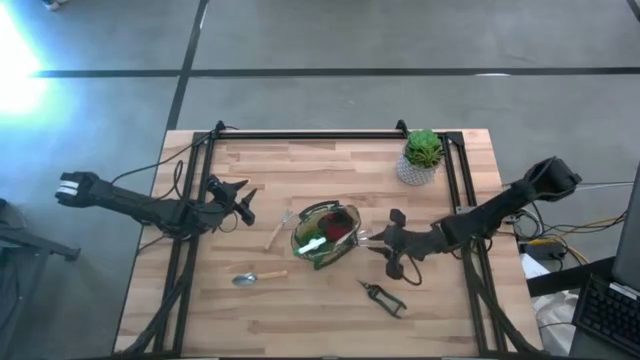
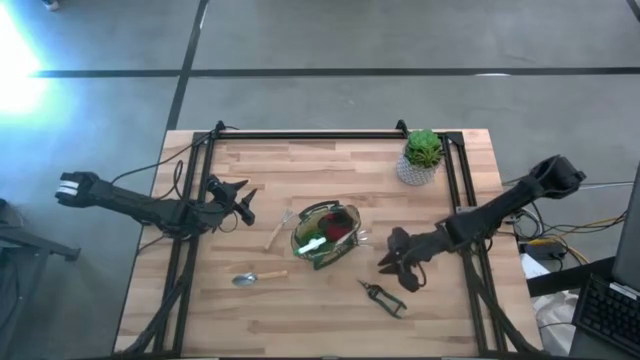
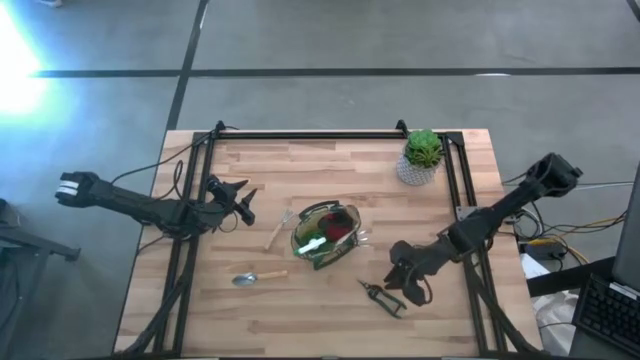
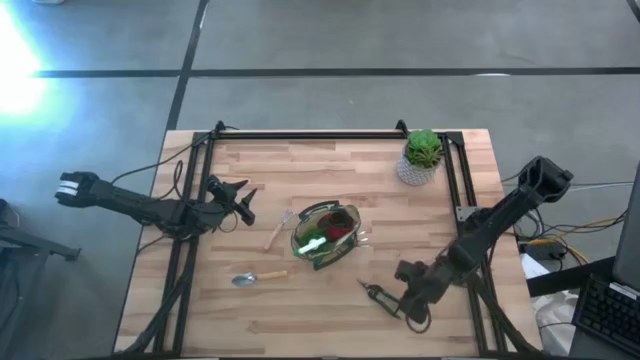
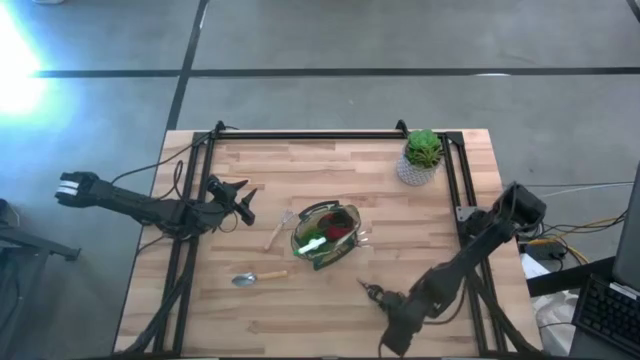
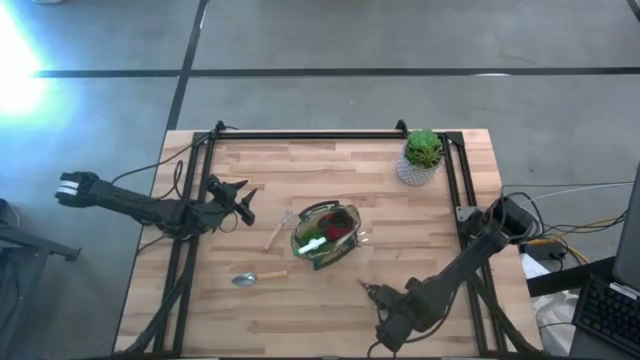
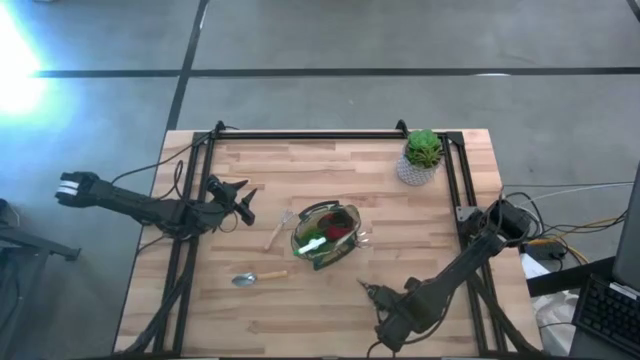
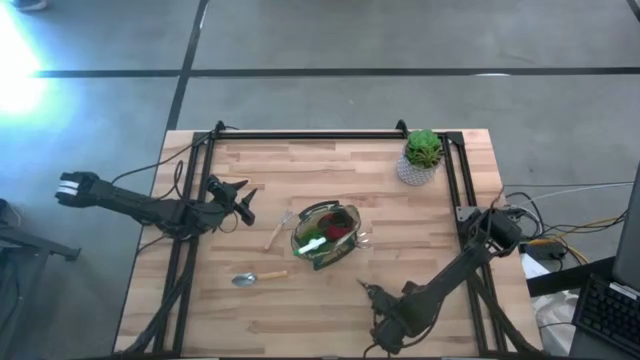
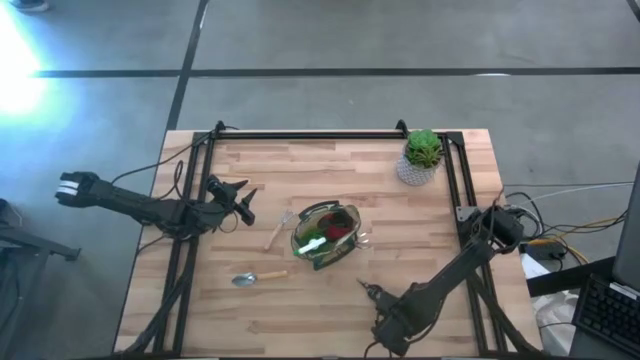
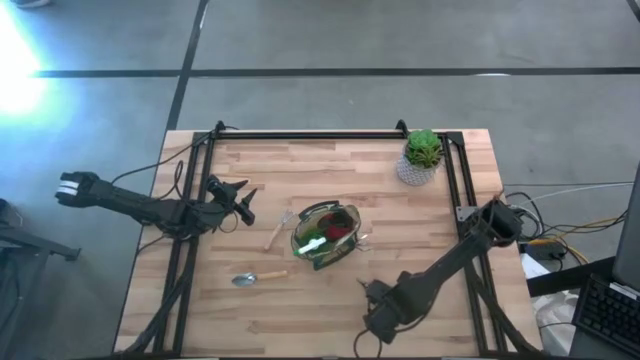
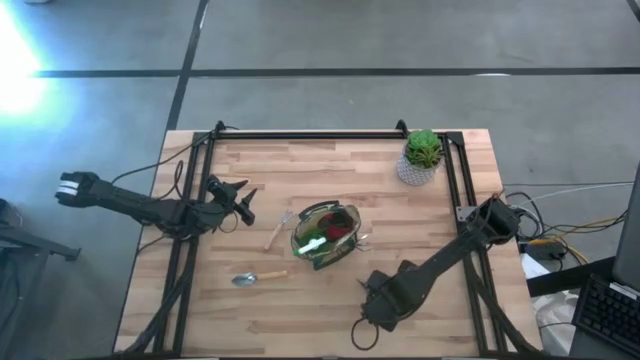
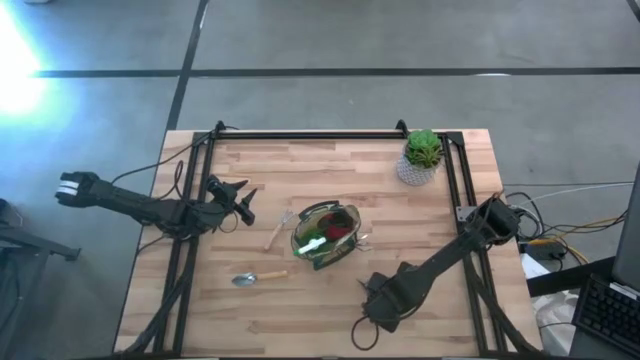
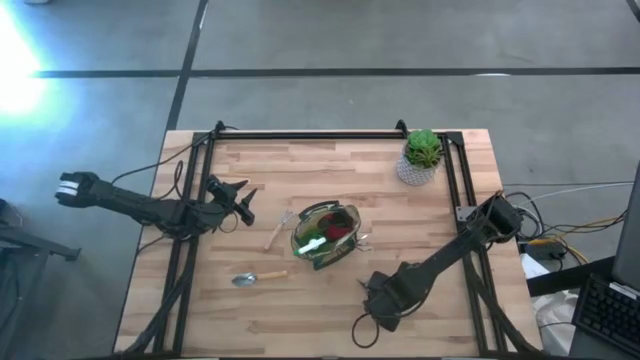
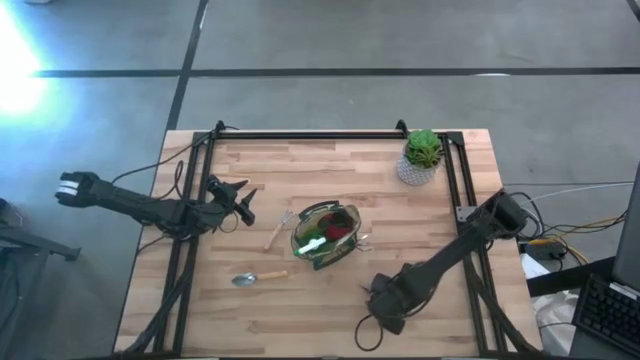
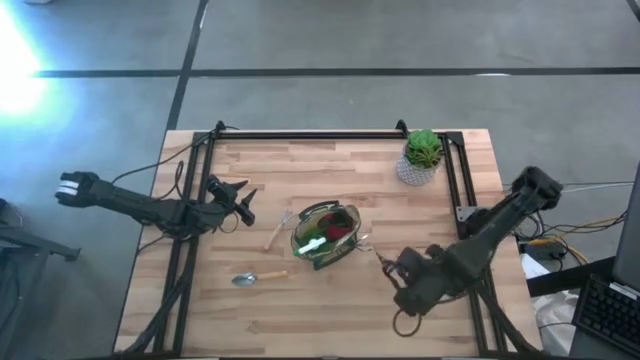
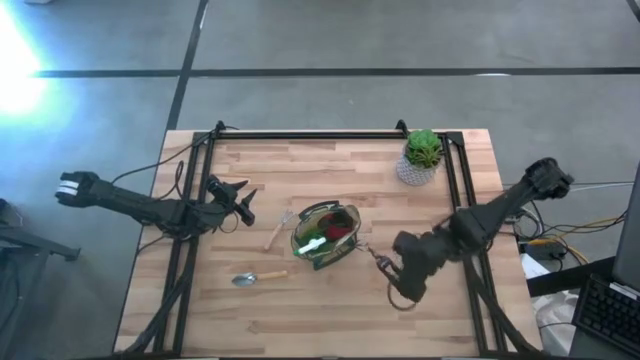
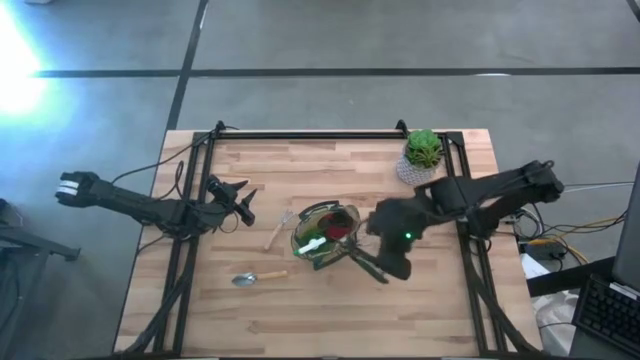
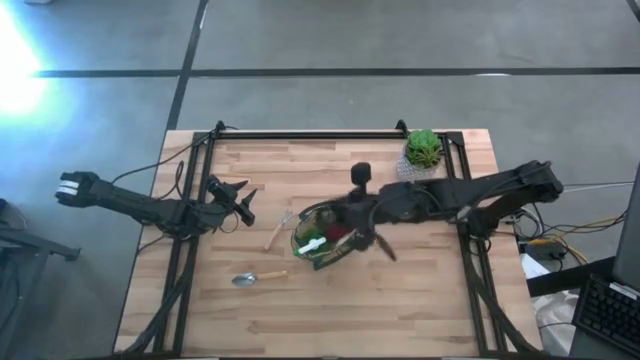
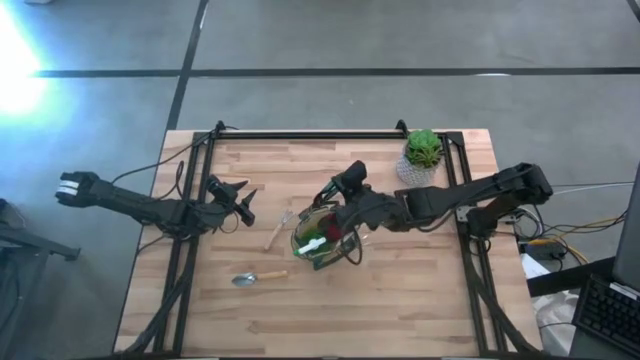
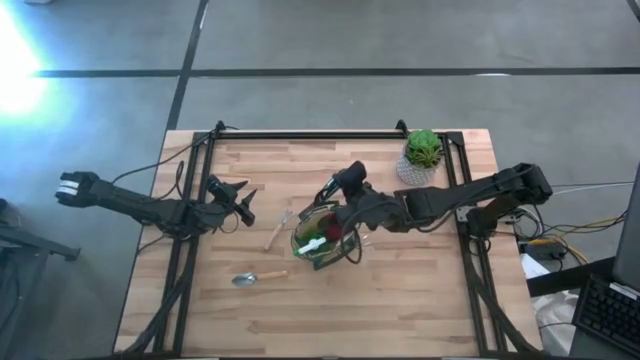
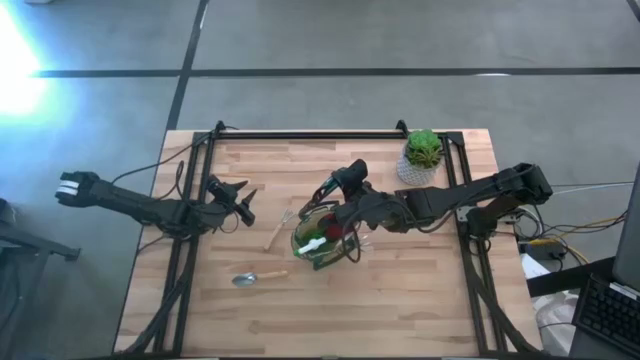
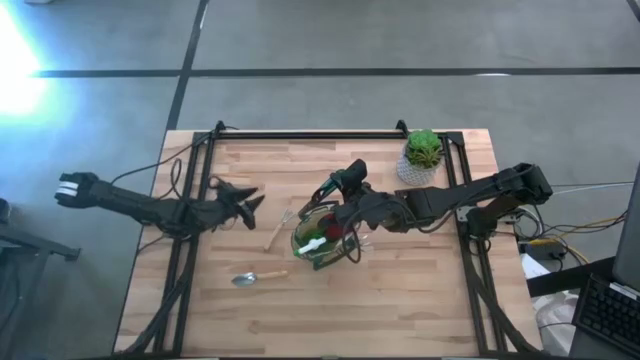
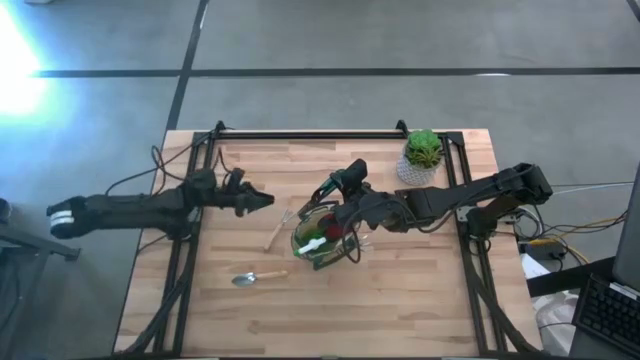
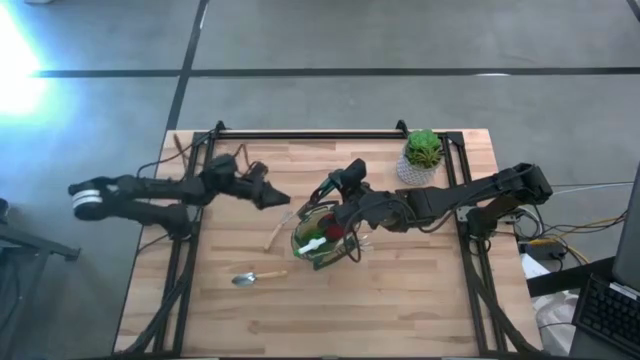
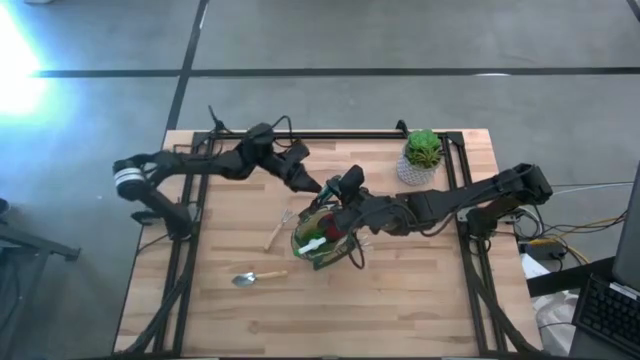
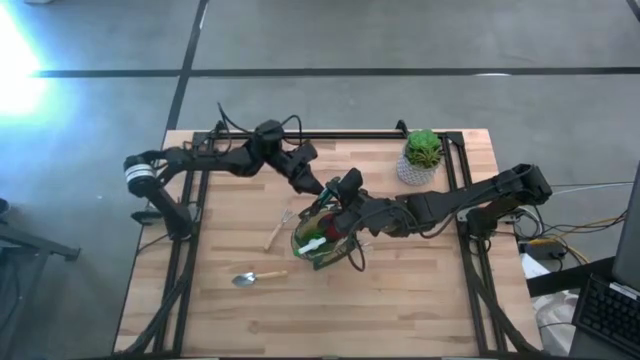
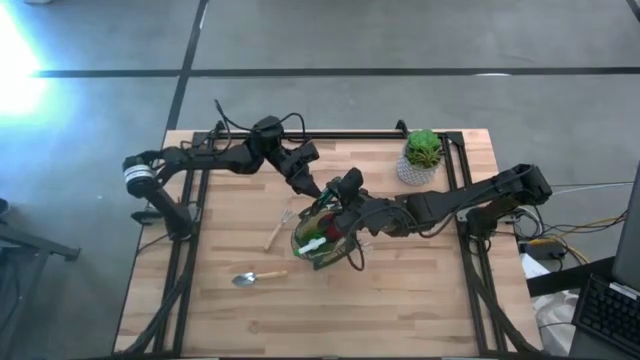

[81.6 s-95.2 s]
Task: Pick & Place Garden tools in Gardening bag
Put the green shears into the green gardening bag

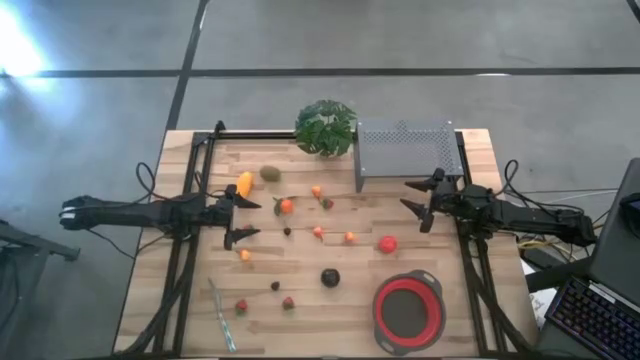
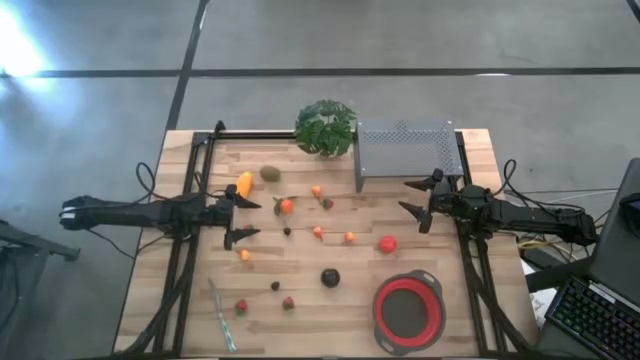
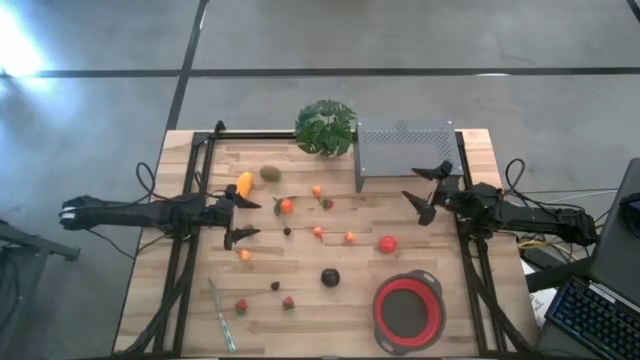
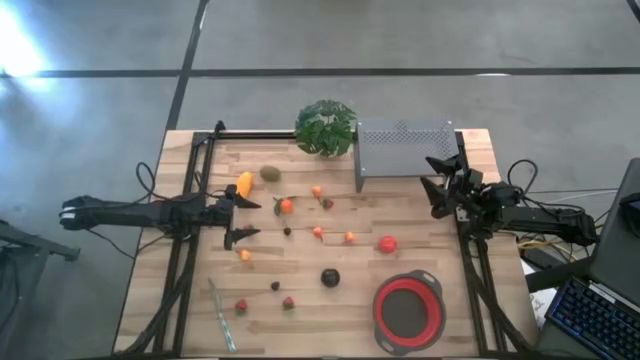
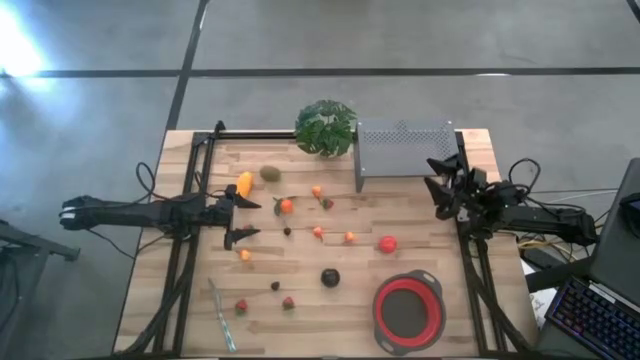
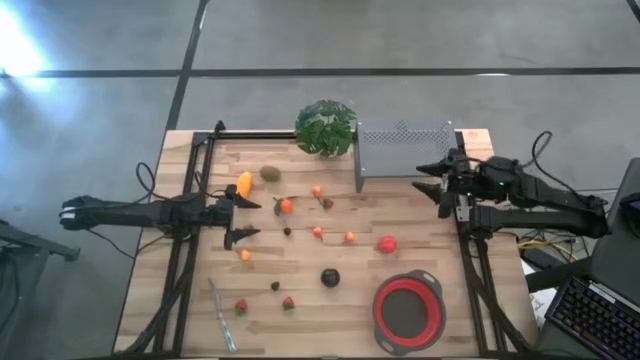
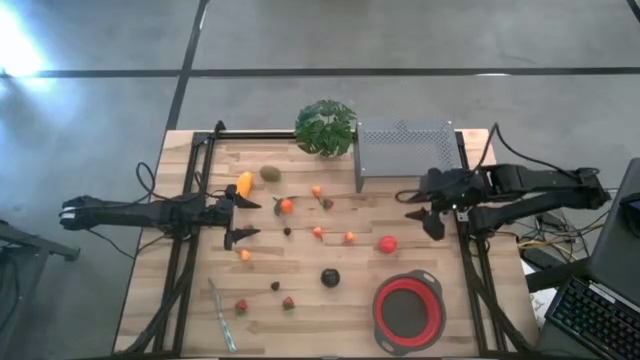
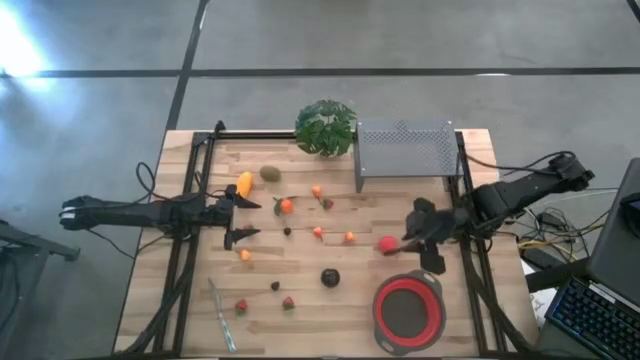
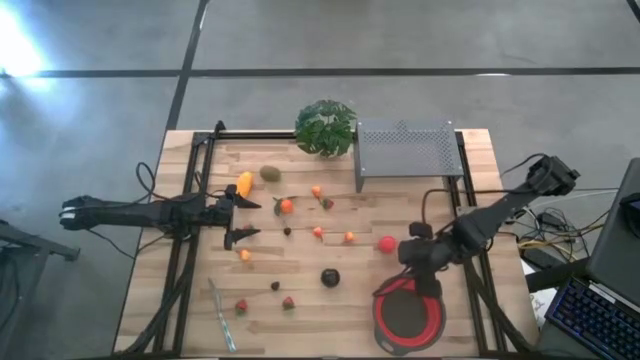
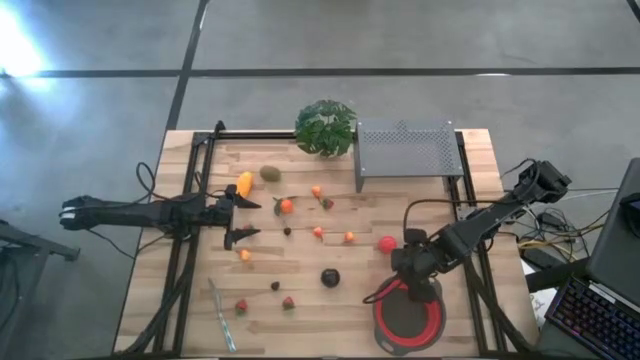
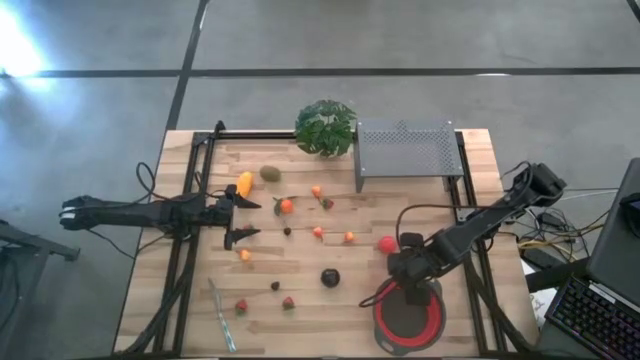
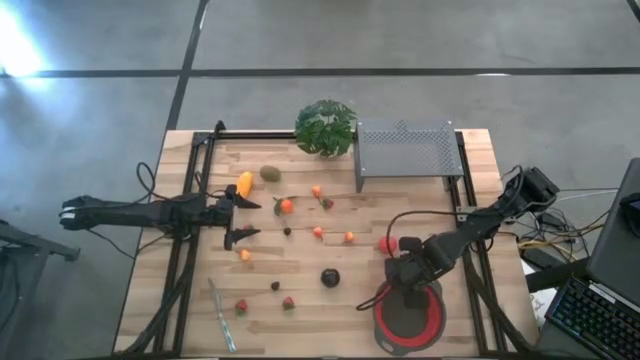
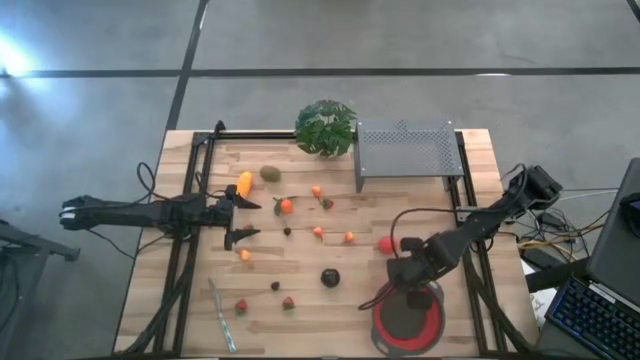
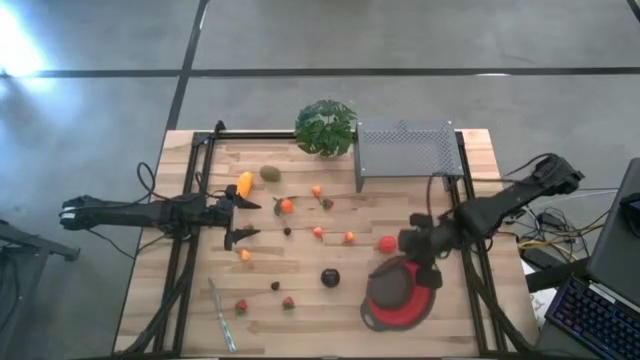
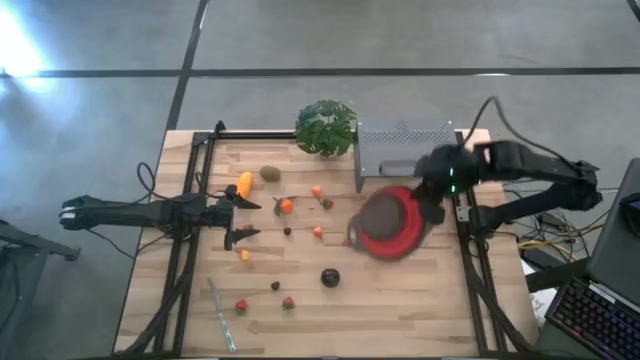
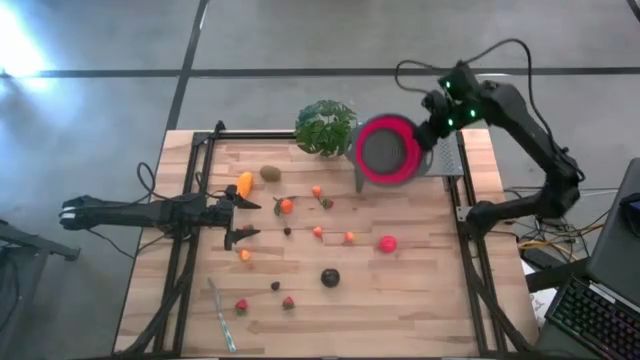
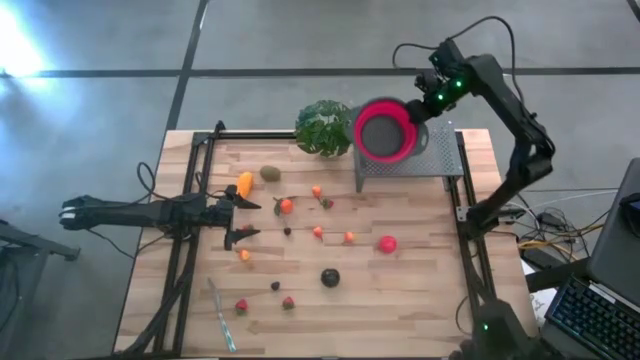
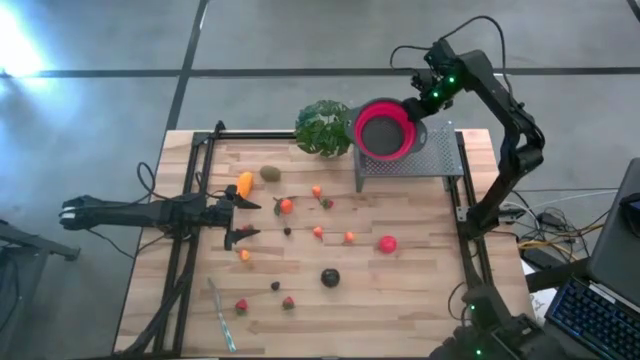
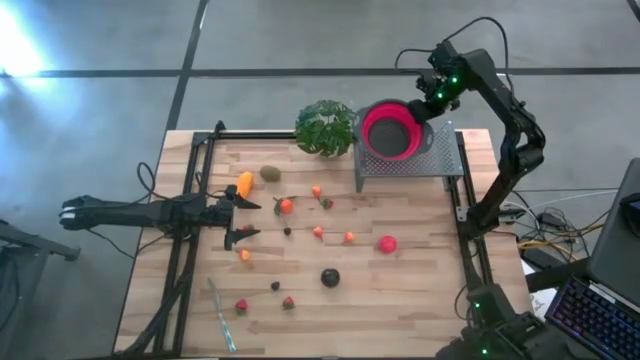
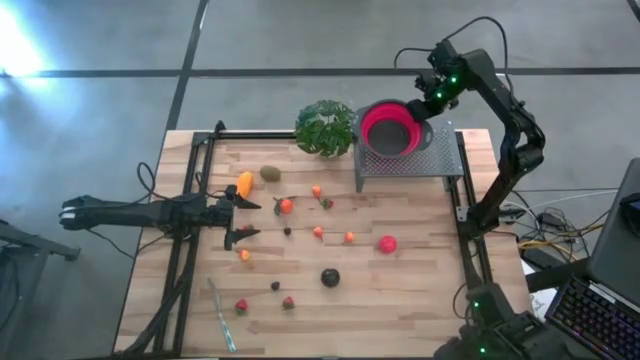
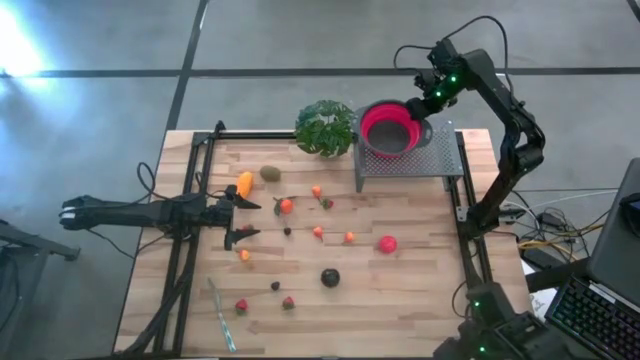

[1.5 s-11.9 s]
Task: Pick & Place Fruit
Put the red strainer bowl on the shelf
